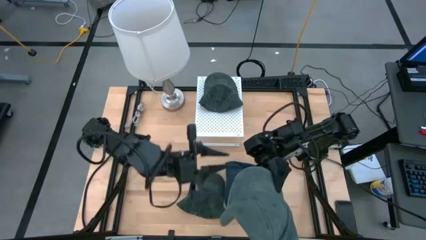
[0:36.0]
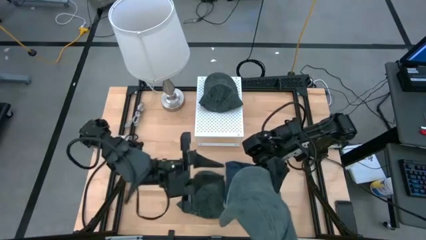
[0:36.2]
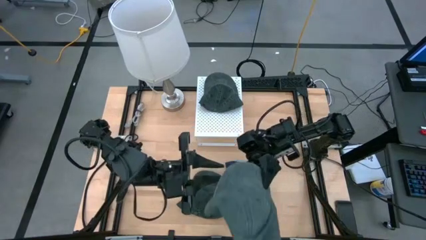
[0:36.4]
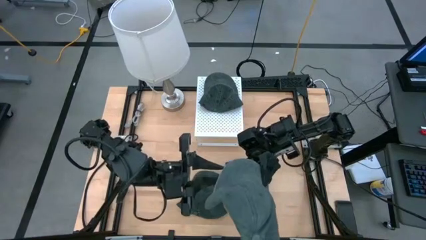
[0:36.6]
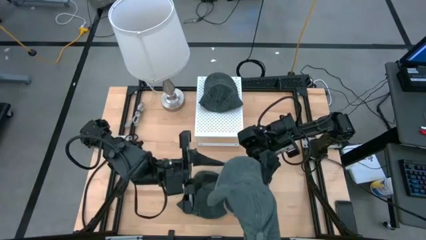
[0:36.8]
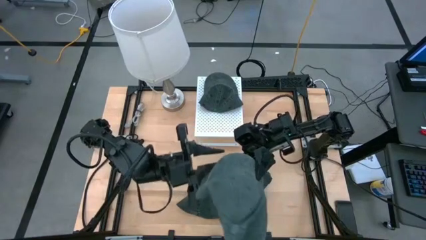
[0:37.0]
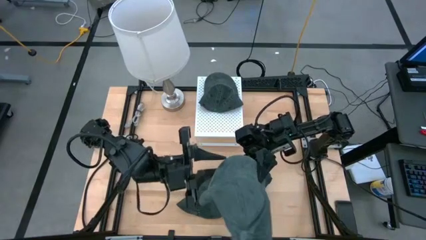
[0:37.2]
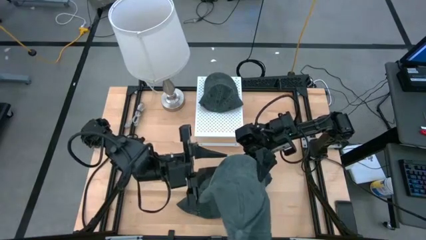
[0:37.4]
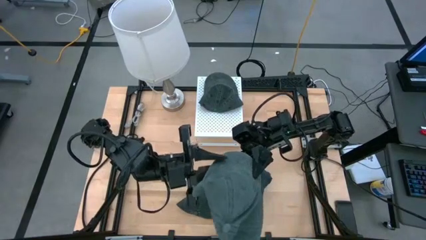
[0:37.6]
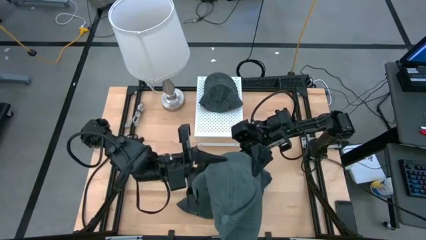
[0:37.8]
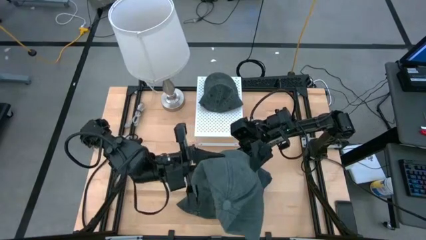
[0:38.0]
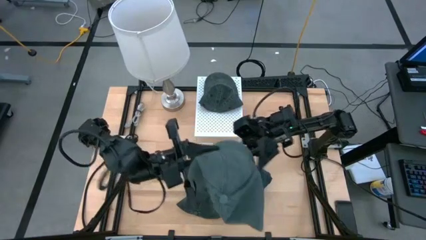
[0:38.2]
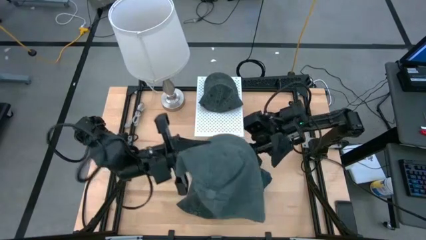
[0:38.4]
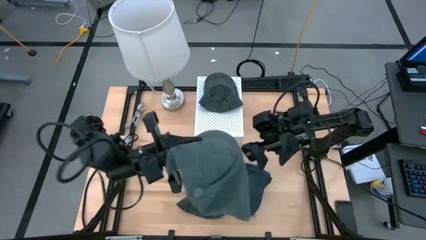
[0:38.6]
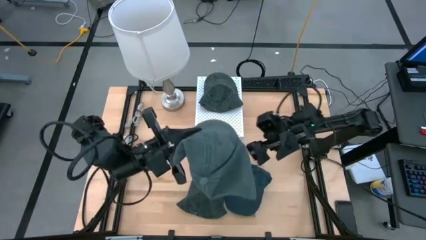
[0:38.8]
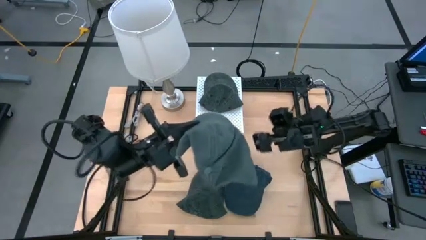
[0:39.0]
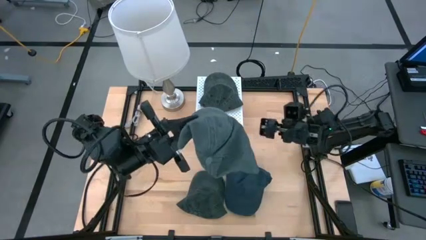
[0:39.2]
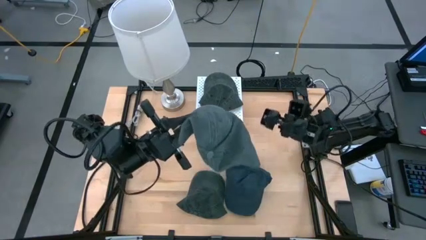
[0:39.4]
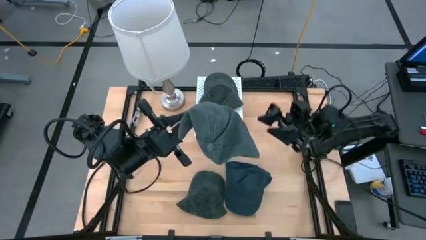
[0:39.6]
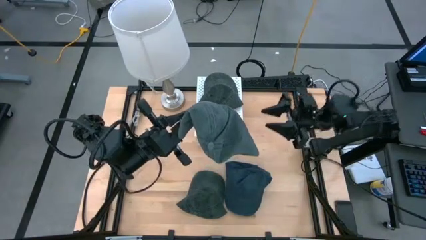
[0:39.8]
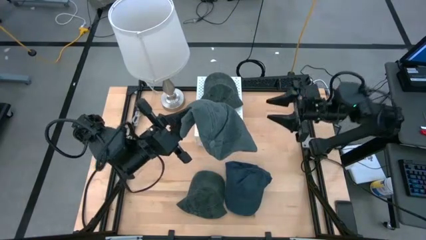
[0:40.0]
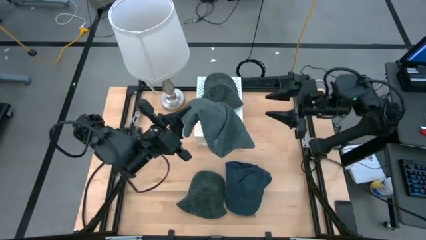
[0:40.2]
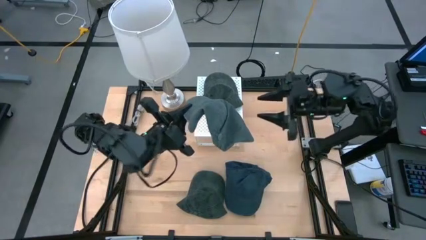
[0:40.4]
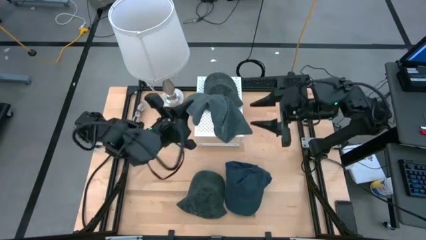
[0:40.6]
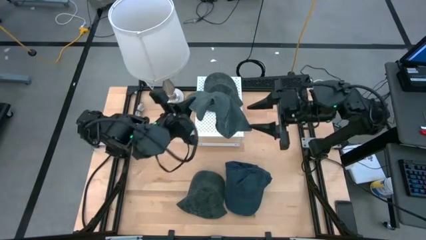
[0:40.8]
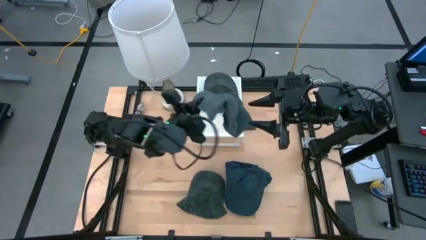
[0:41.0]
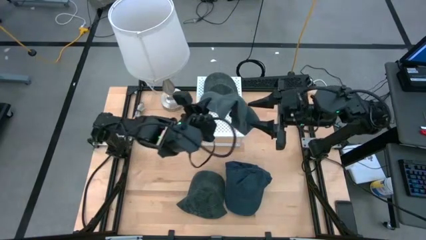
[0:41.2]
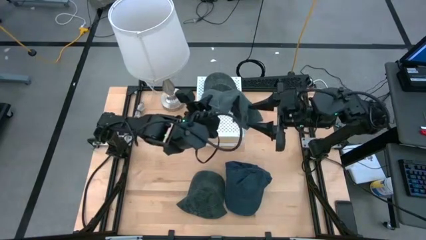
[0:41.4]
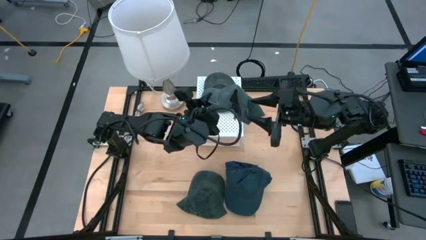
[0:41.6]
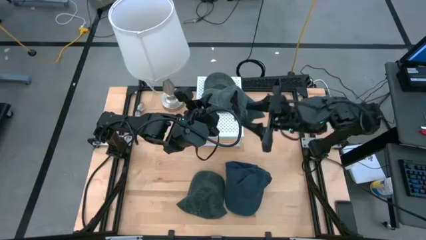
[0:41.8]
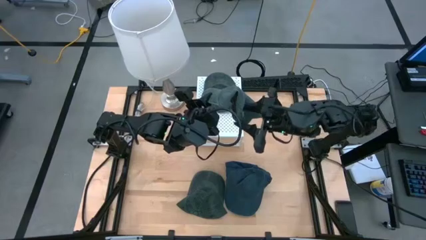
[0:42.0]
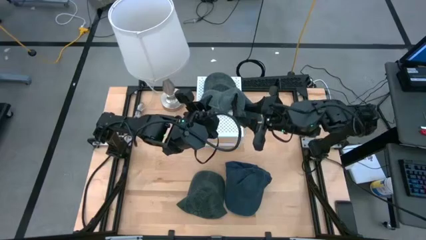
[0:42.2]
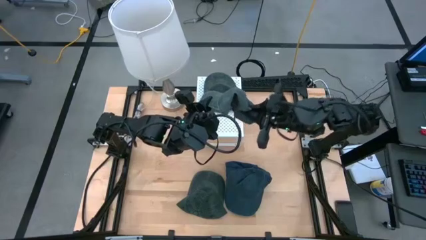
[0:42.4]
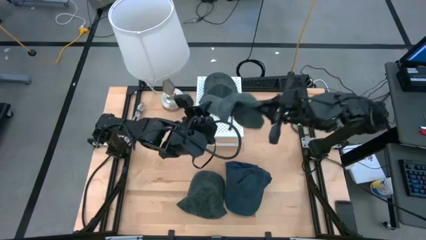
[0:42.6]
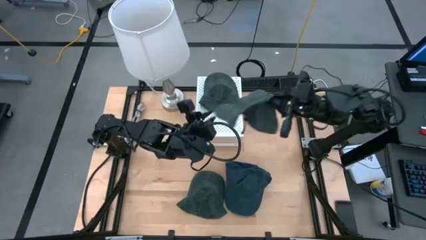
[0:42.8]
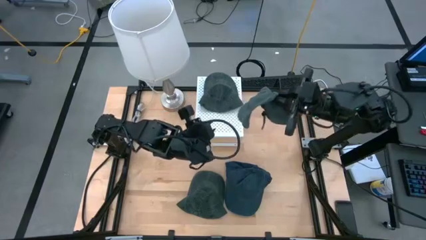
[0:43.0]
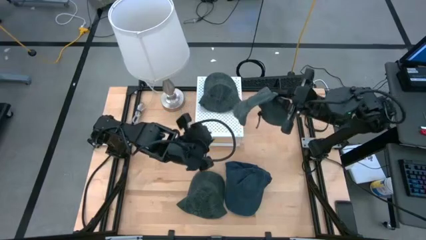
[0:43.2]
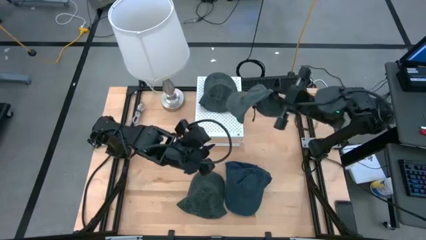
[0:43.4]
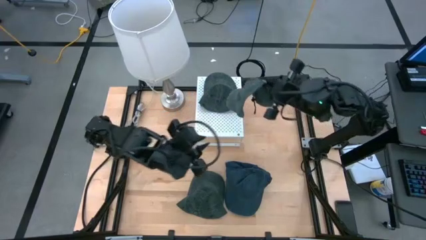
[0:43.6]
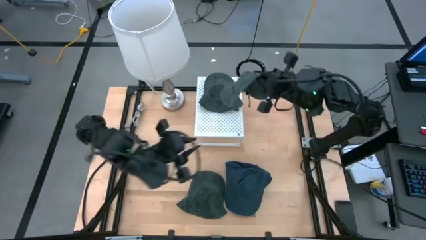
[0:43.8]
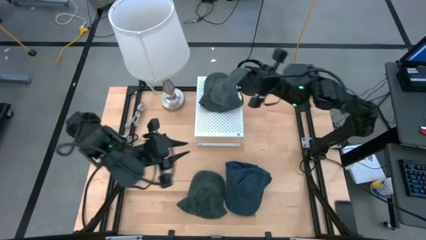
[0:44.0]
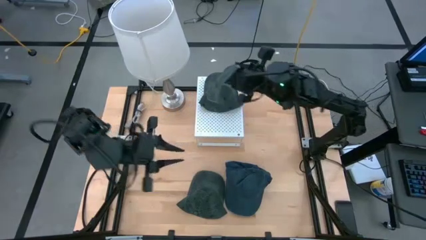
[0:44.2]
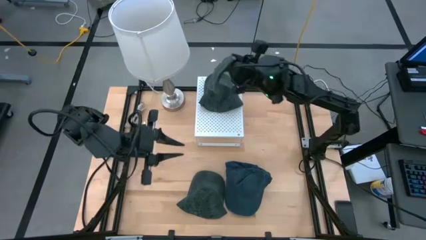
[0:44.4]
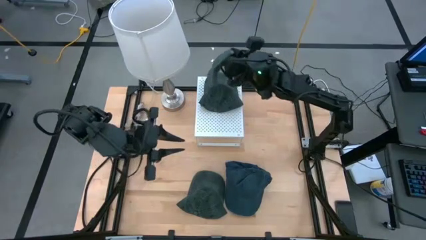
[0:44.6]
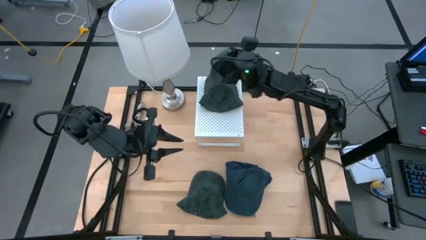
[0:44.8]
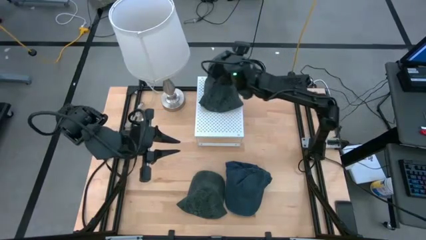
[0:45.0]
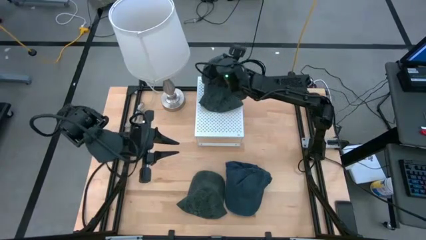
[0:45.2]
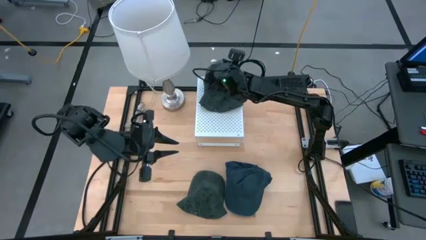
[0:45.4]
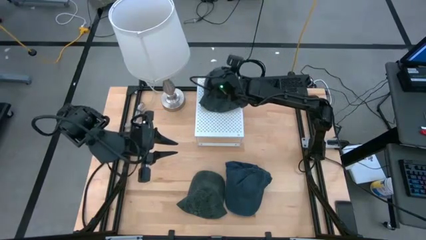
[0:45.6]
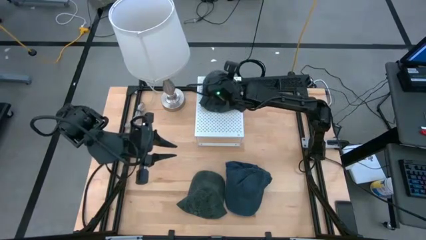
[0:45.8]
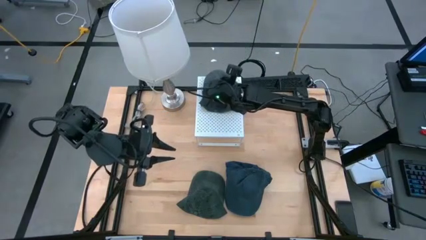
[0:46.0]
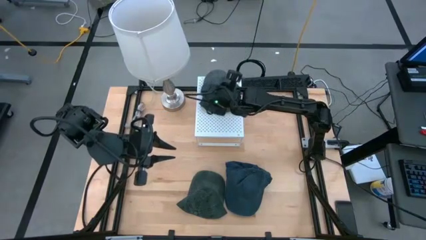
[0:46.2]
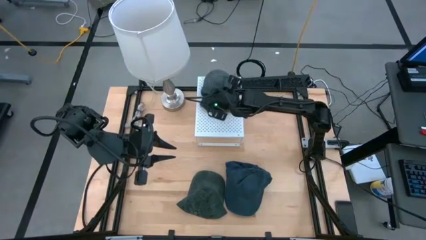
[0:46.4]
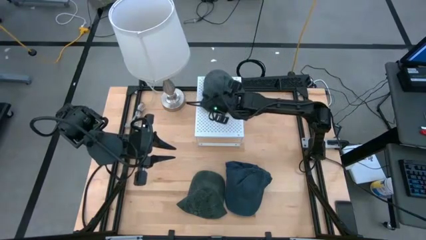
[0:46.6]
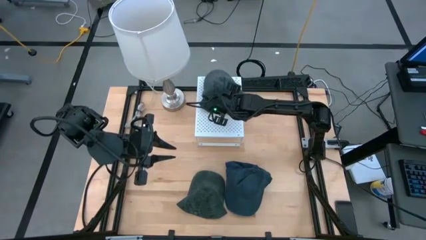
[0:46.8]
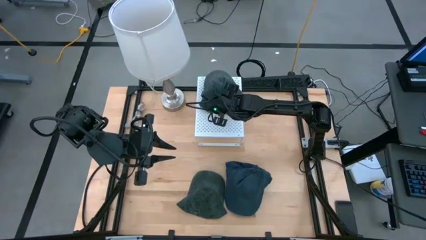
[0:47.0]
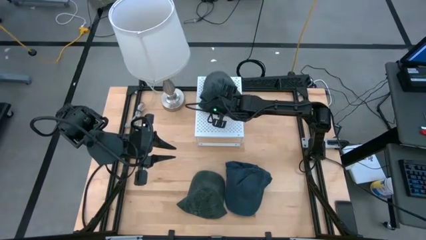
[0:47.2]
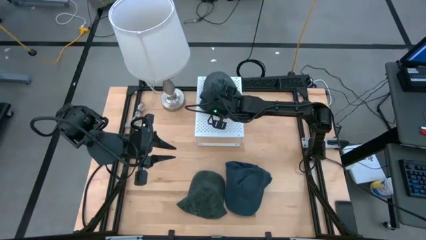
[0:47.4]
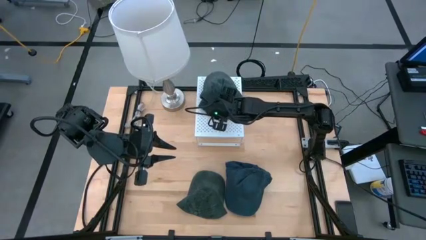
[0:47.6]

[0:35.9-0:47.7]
Task: Pick & Place hat
Stack the black cap on top of the other black cap on the shelf

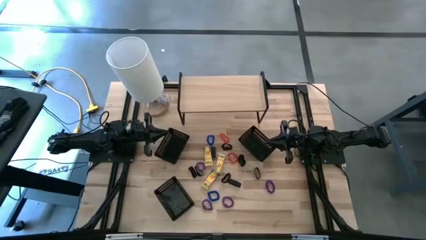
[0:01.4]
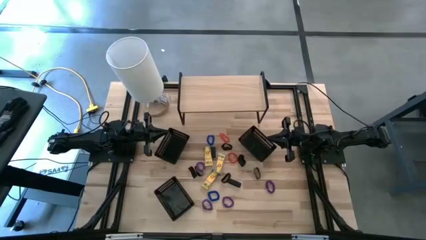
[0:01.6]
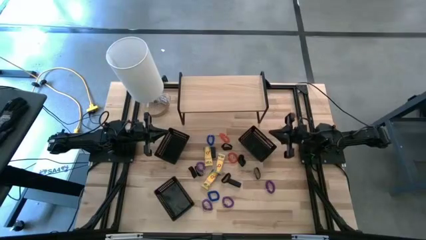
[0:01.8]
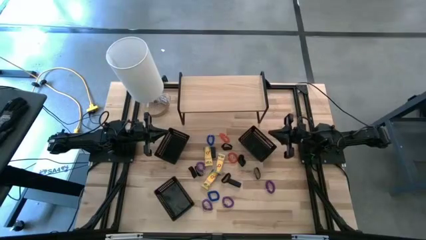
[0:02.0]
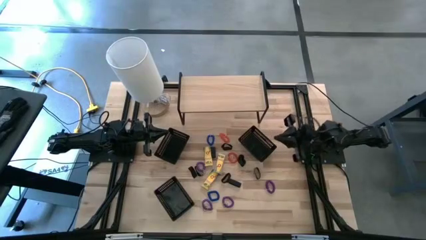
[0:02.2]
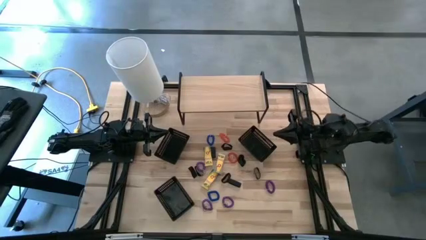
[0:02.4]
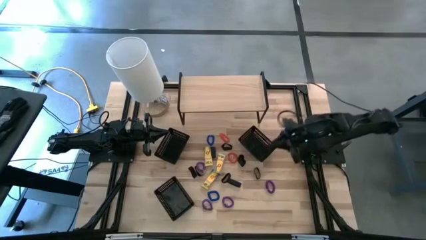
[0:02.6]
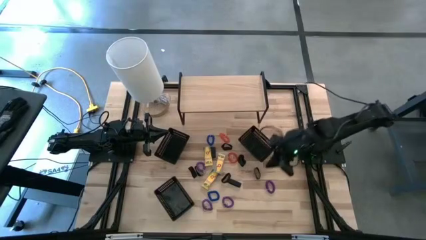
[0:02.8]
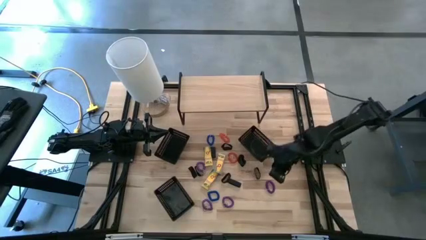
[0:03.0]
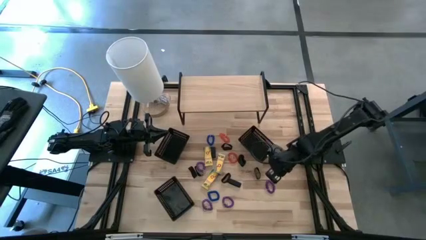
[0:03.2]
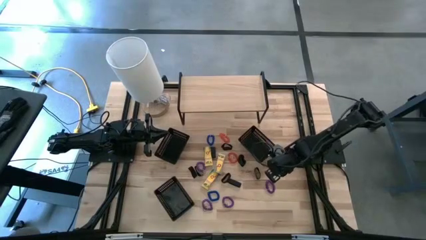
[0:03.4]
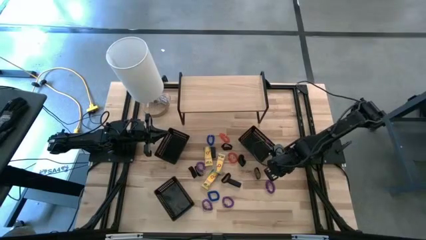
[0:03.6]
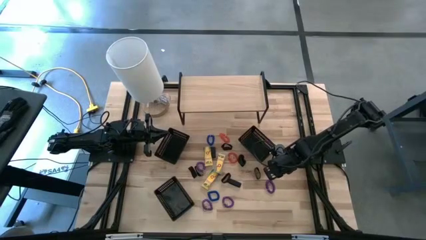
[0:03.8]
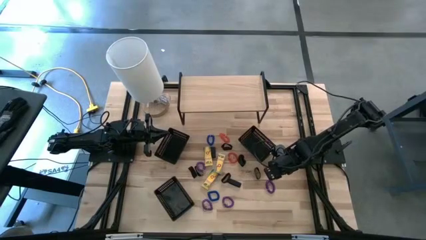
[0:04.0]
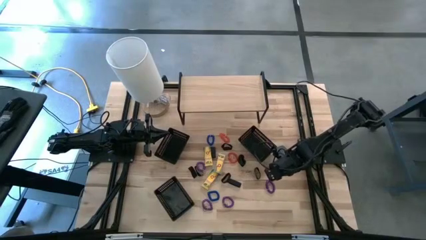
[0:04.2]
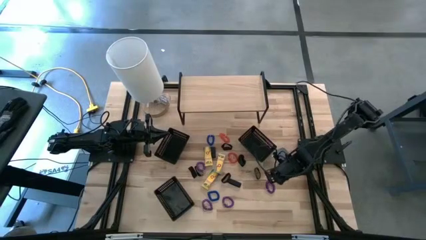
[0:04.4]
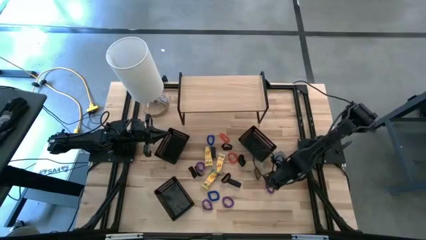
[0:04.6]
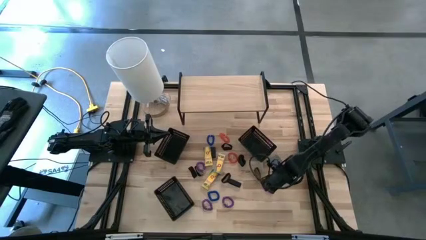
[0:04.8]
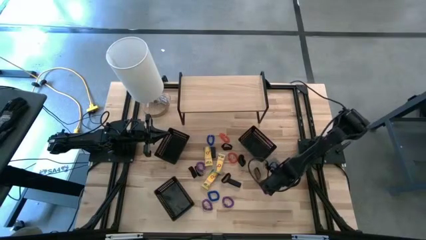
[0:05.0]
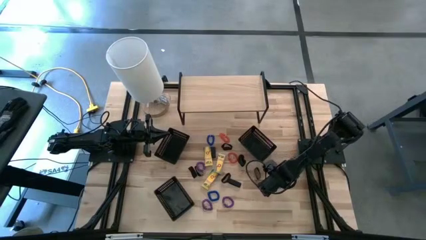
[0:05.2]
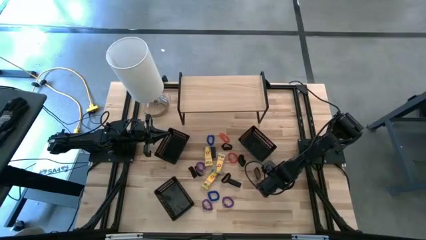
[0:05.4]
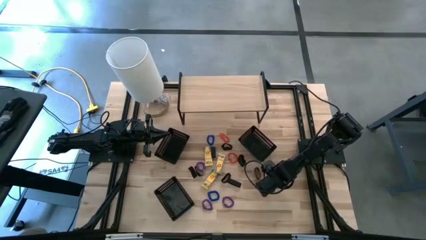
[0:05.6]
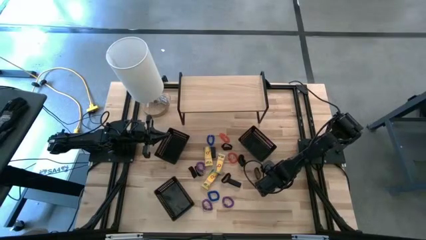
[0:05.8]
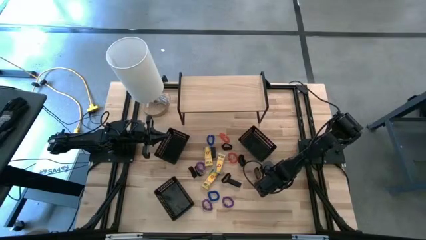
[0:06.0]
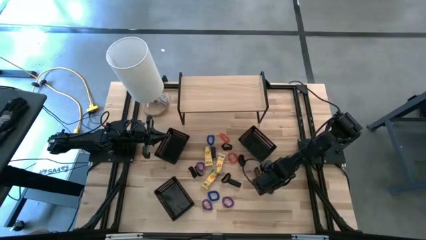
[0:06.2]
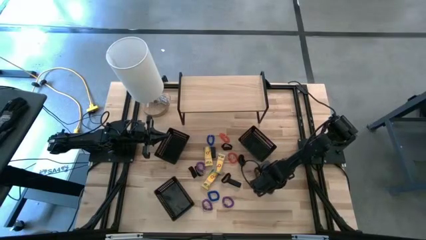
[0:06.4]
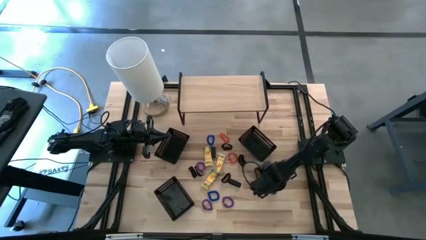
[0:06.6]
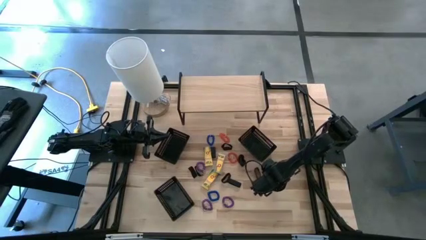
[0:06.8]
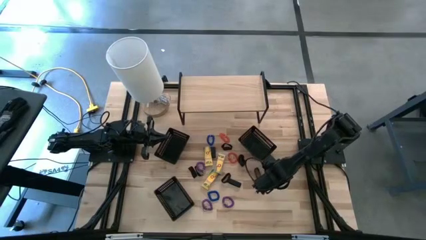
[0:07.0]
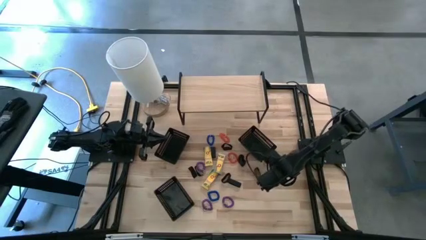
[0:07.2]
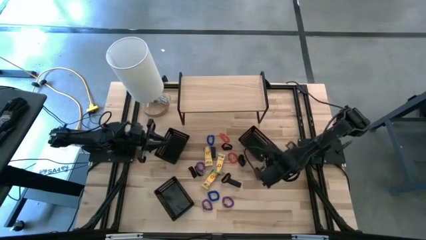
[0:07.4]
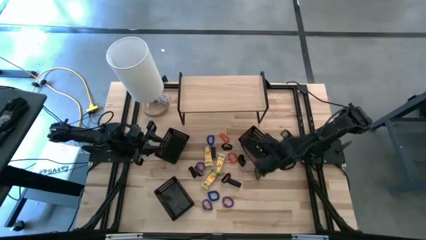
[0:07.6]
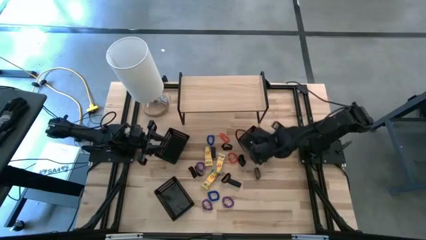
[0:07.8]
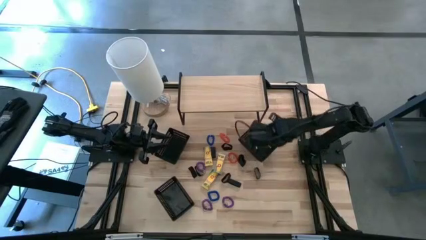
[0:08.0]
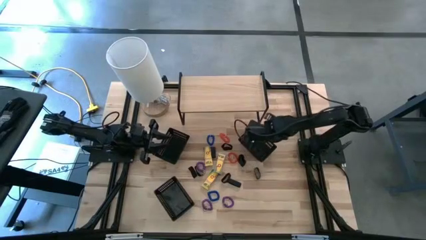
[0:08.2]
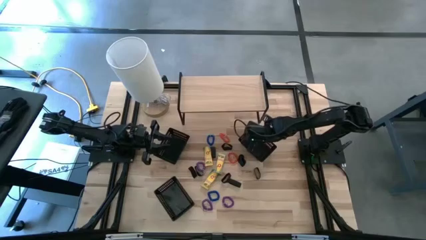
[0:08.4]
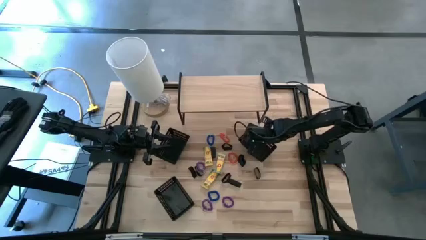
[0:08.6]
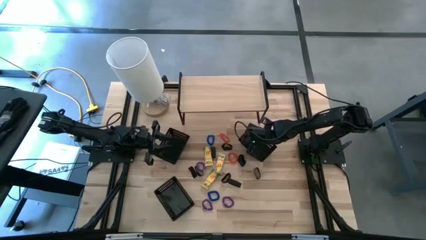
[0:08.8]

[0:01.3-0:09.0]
Task: Pick & Place Office Desk Supplies
Put the purple spring keychain into the top right black bin
